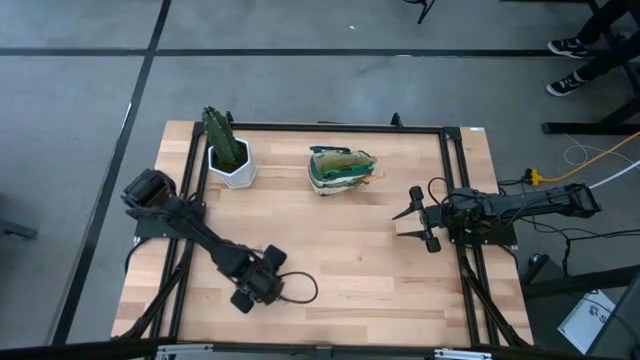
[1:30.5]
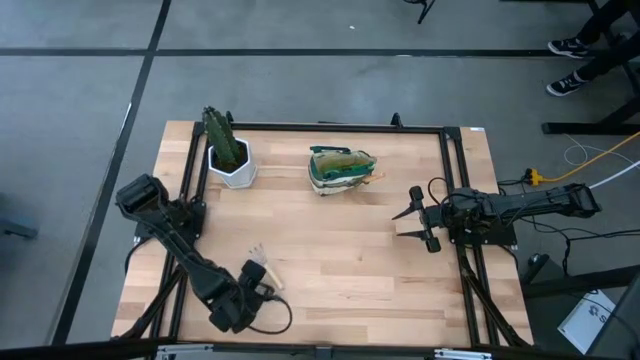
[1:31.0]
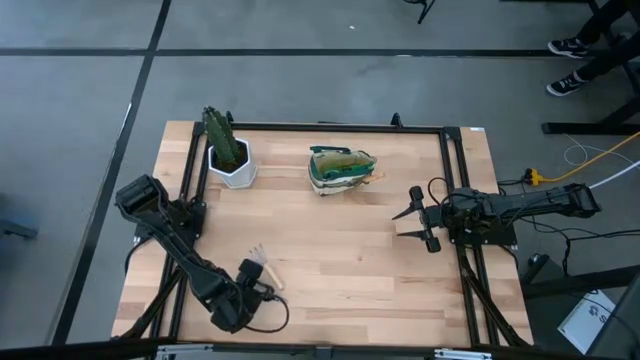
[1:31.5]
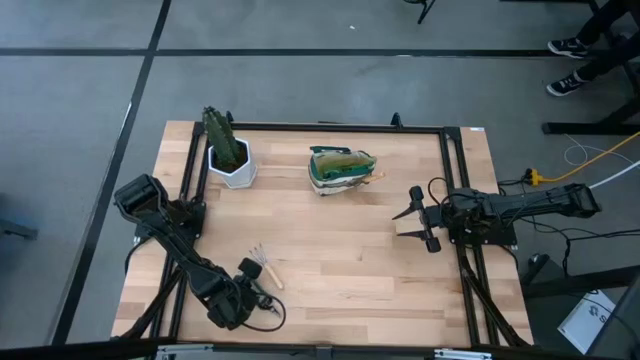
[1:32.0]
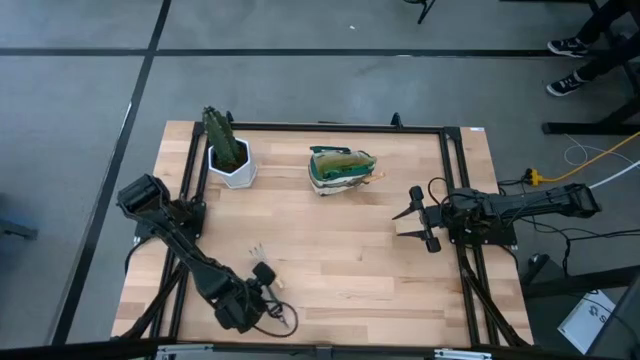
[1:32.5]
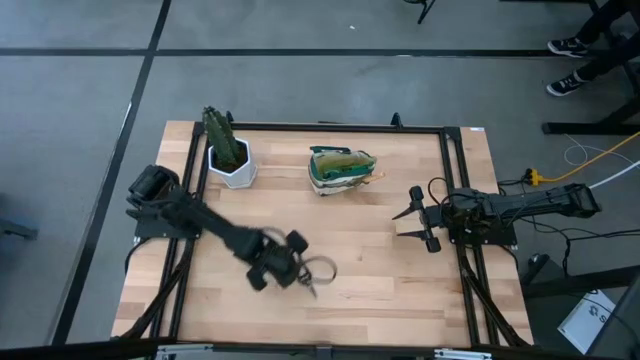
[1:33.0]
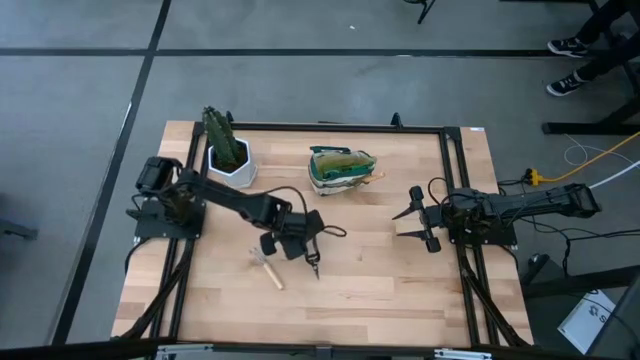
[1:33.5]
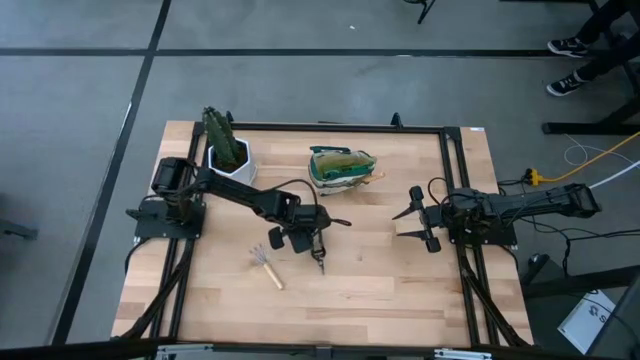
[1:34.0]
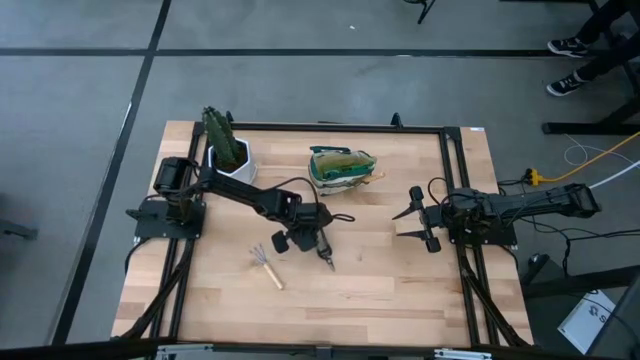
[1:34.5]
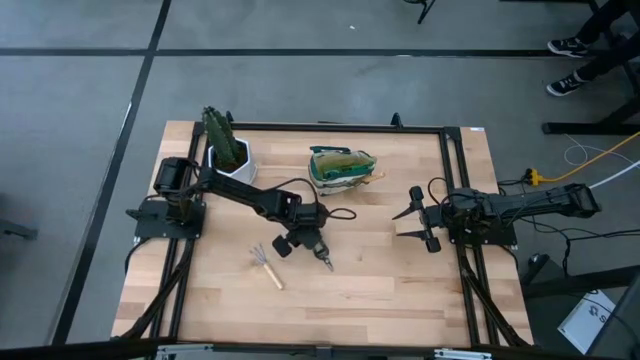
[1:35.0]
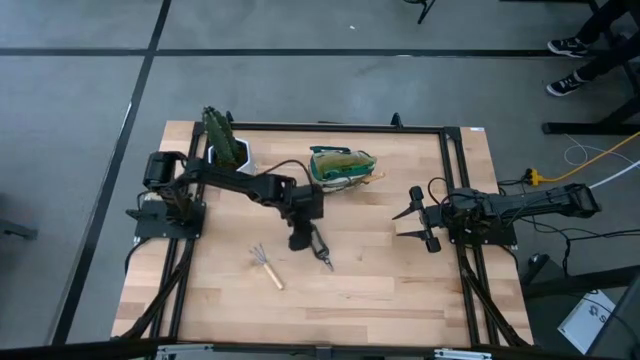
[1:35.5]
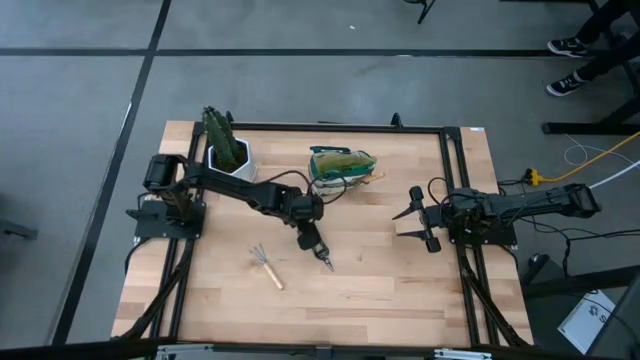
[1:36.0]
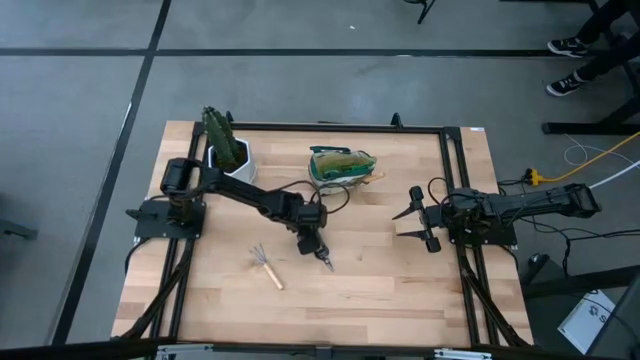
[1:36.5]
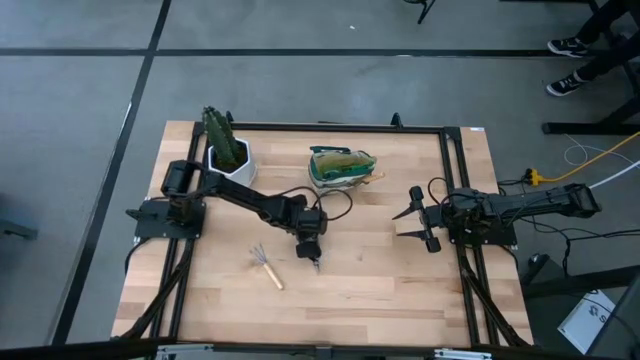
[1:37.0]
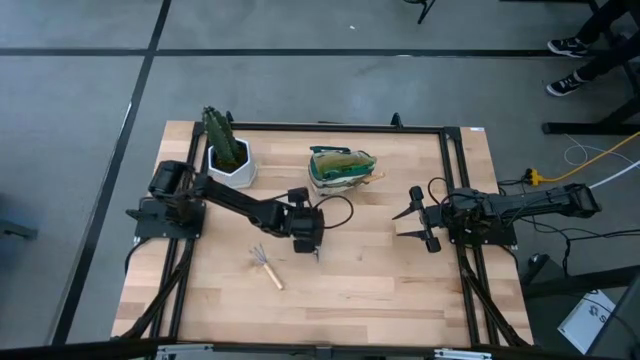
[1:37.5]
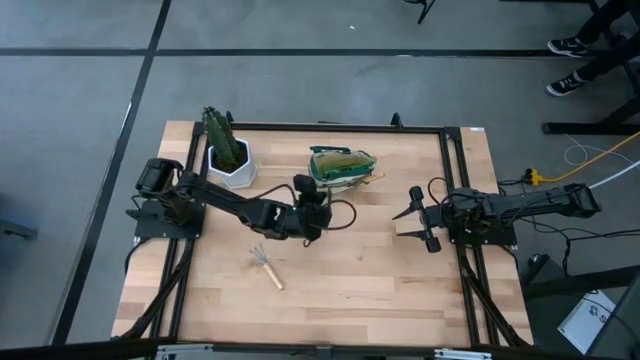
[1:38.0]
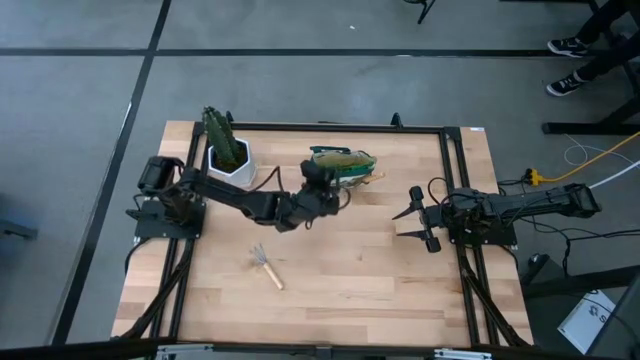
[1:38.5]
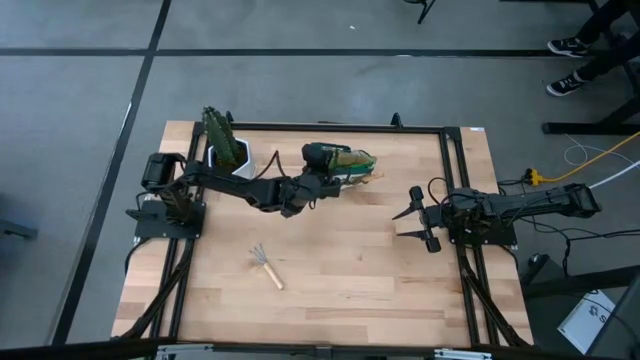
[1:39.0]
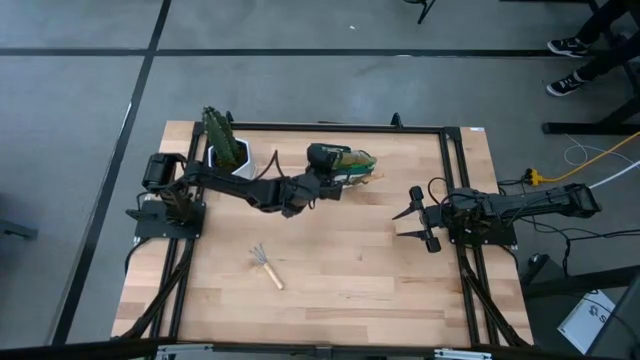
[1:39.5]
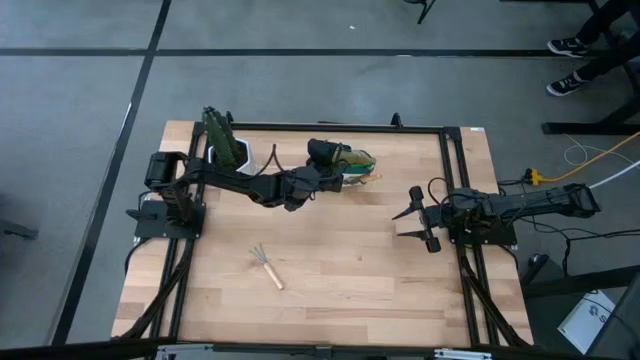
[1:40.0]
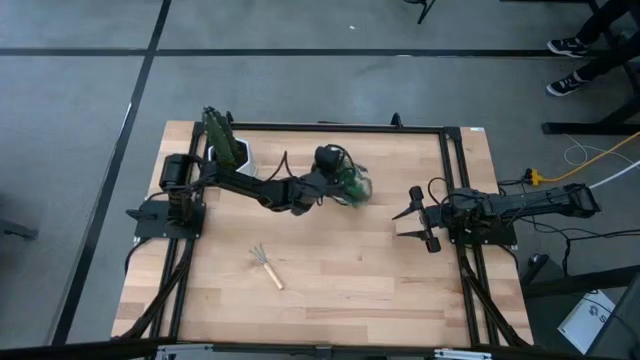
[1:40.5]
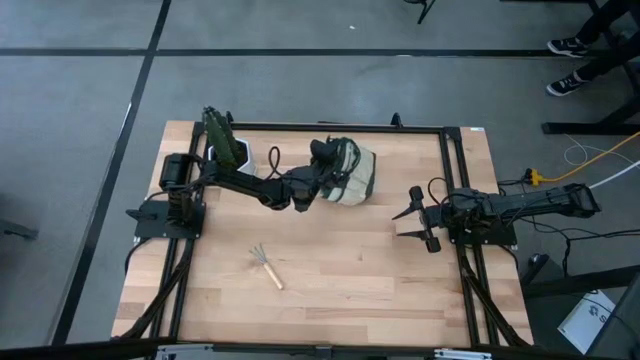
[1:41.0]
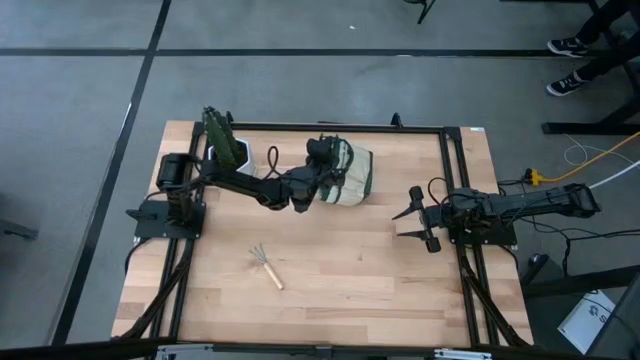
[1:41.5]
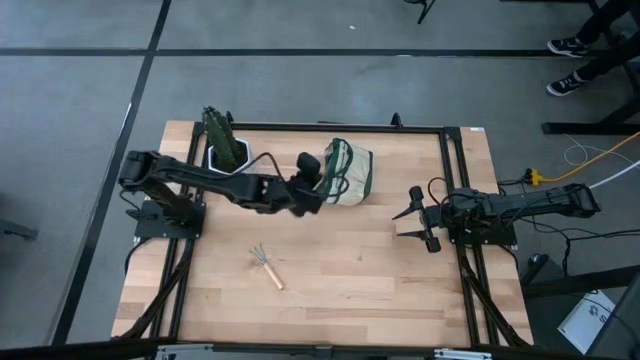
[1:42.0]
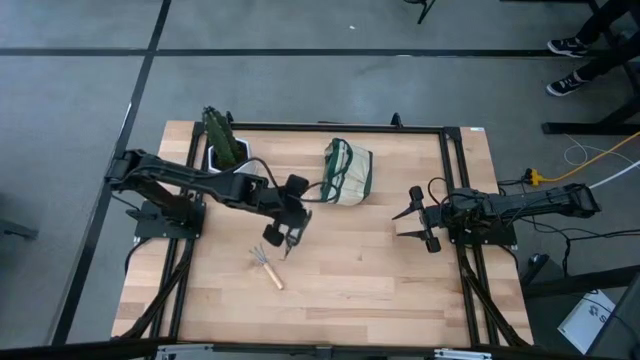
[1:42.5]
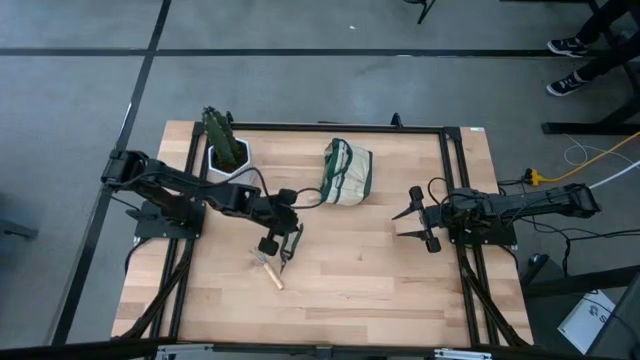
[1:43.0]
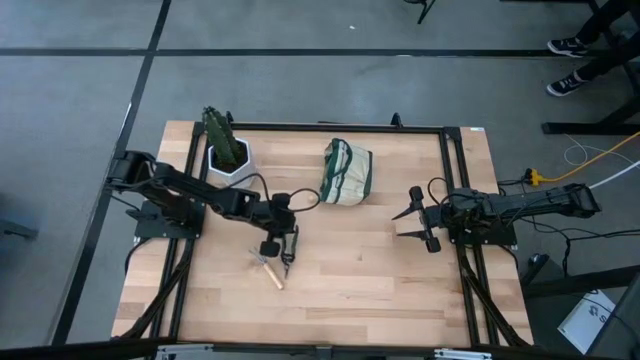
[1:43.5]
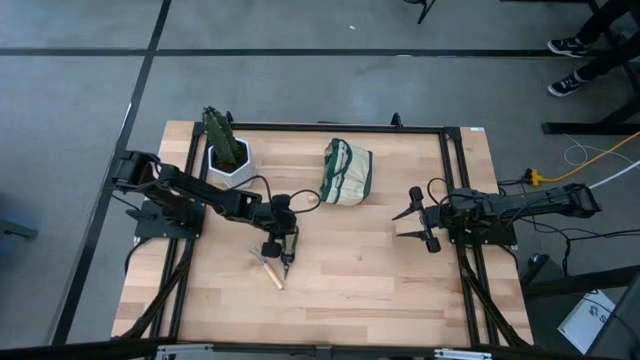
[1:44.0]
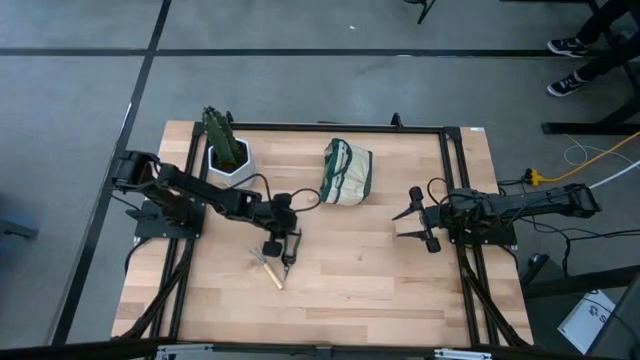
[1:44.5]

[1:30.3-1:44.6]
Task: Pick & Place Garden tools in Gardening bag
Put the fruit pruner into the gardening bag

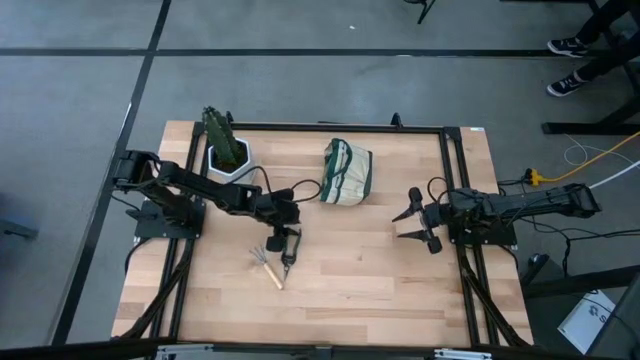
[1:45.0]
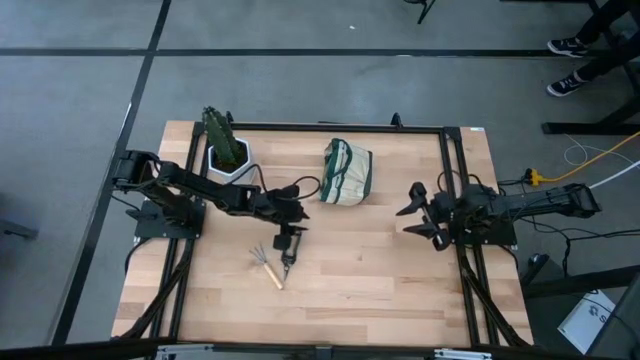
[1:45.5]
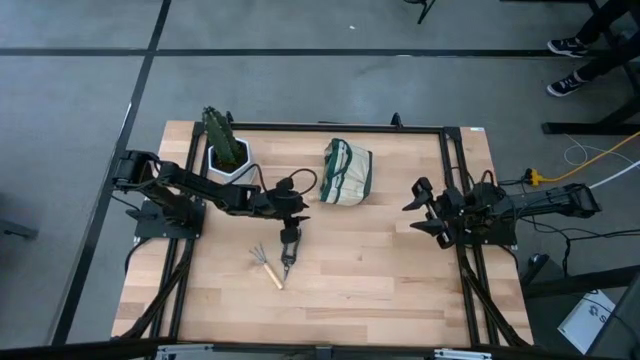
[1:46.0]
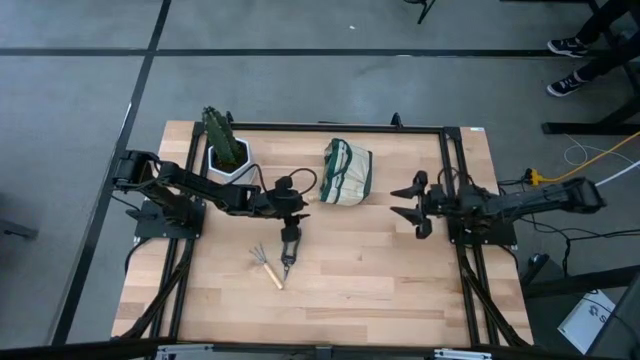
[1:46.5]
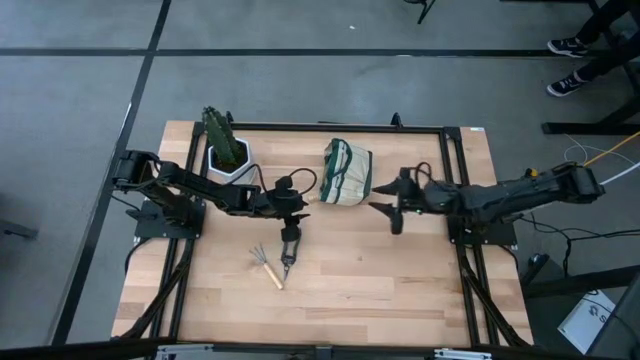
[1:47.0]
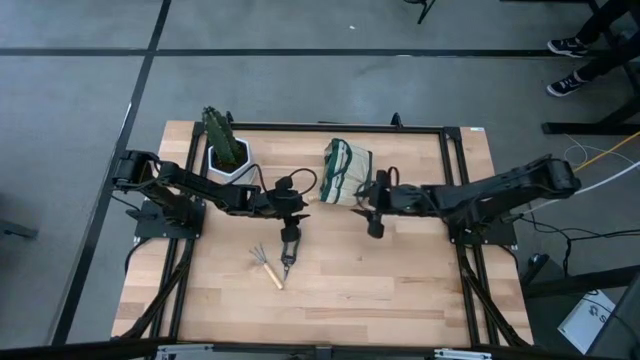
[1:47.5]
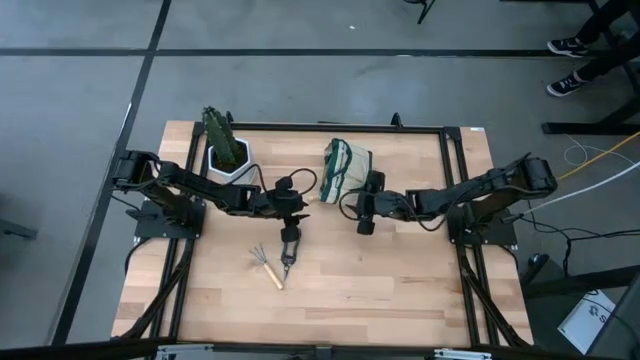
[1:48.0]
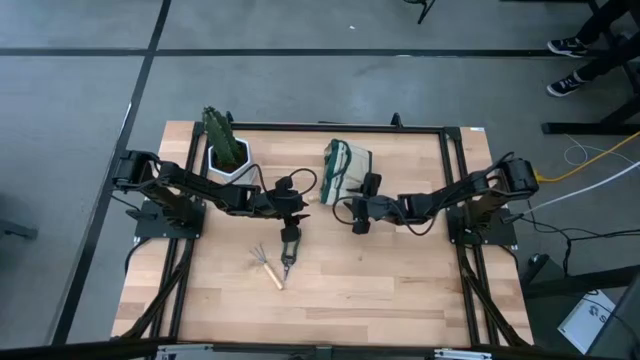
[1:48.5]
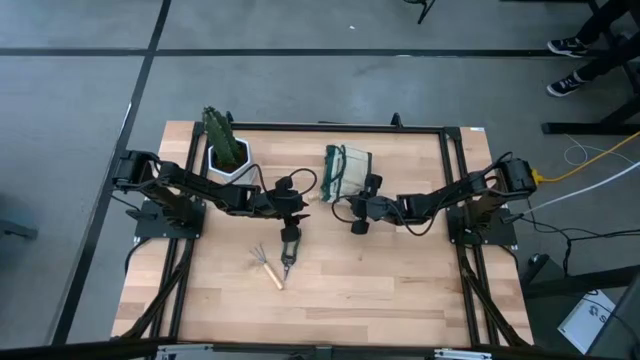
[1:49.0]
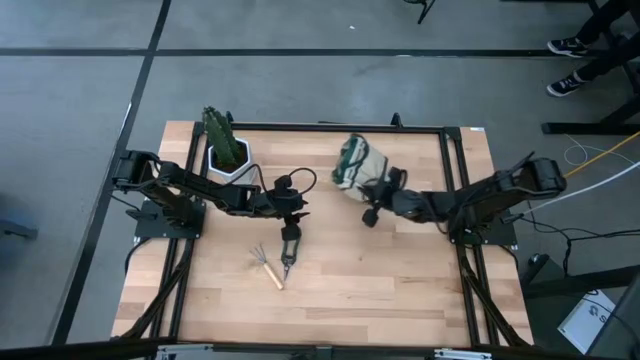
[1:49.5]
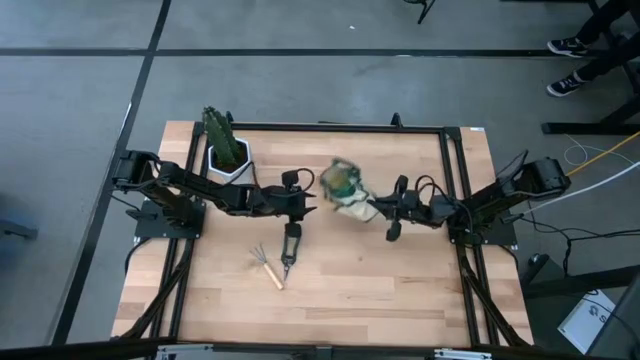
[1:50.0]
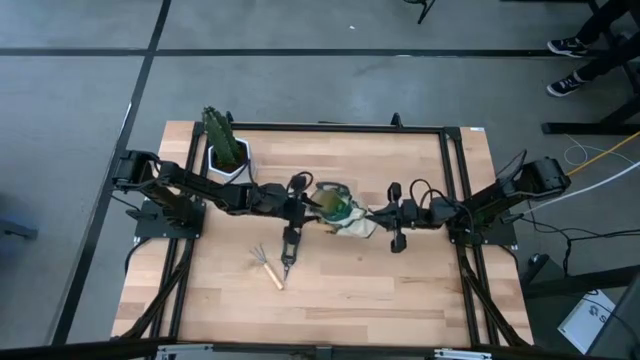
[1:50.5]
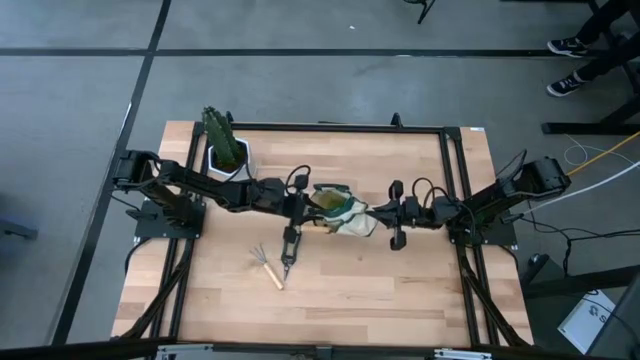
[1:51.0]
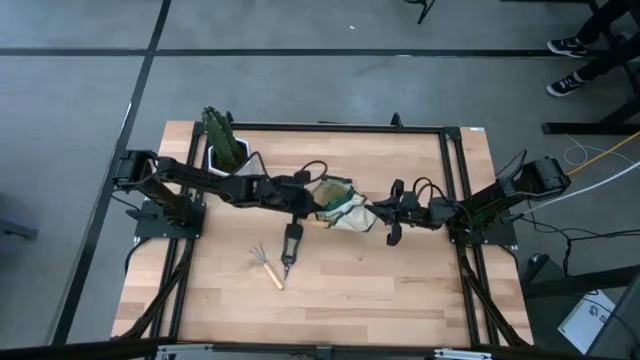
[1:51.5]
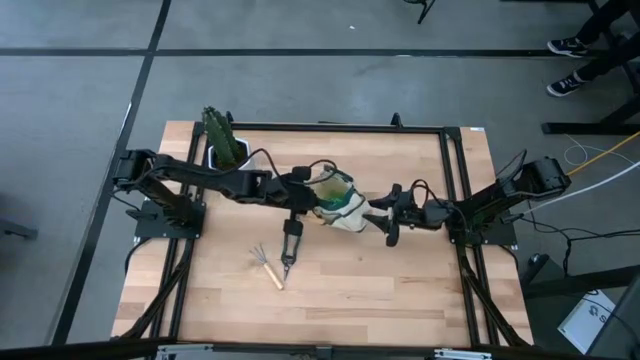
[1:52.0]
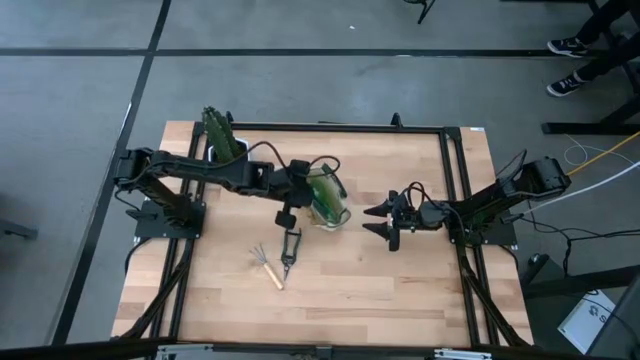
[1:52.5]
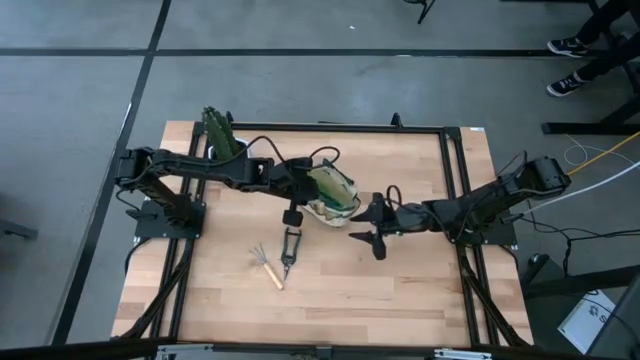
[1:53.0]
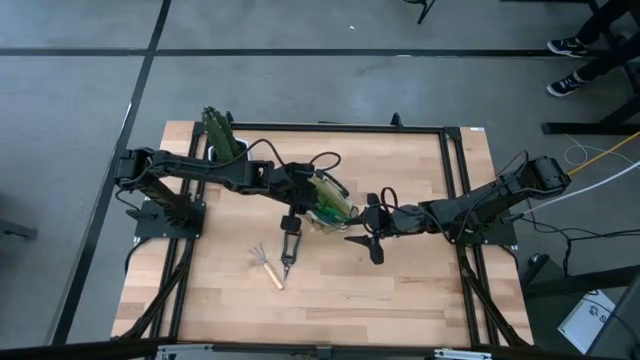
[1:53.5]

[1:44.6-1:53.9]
Move the gardening bag to the center of the table
